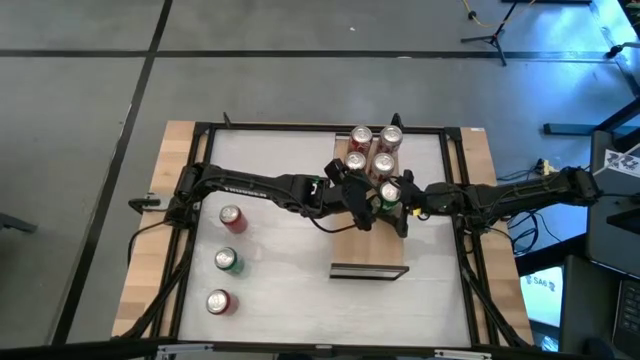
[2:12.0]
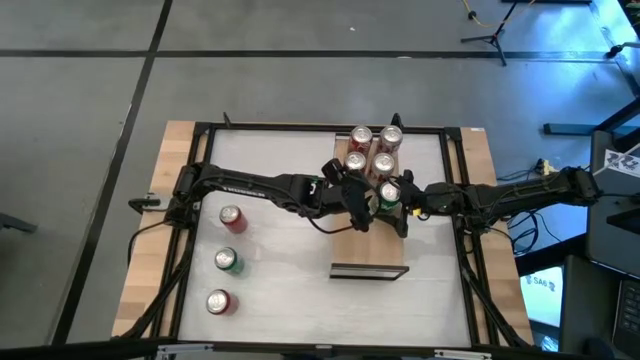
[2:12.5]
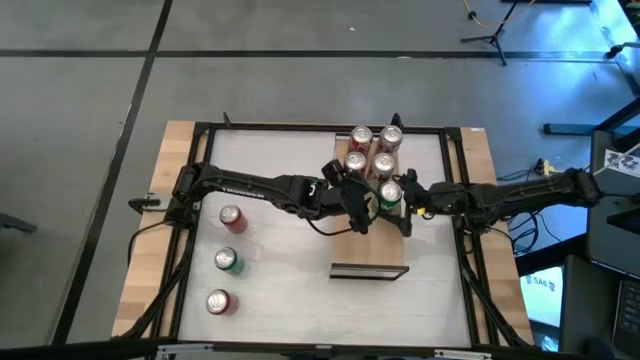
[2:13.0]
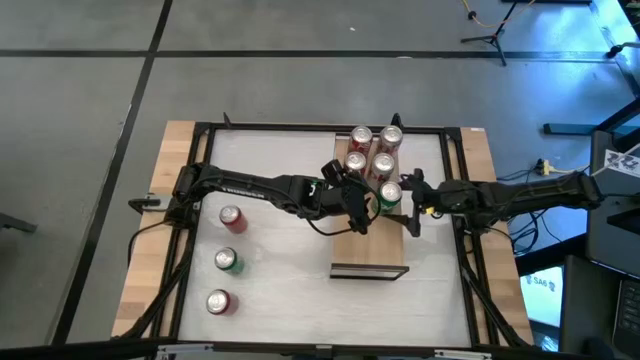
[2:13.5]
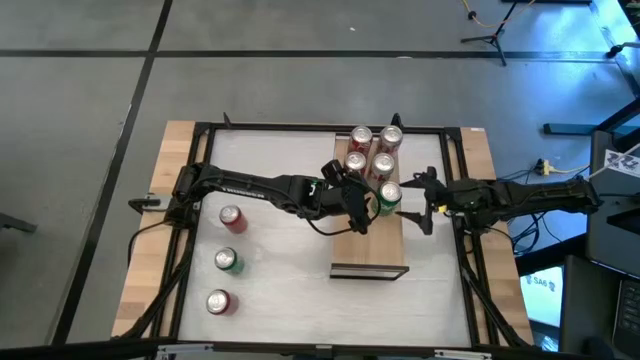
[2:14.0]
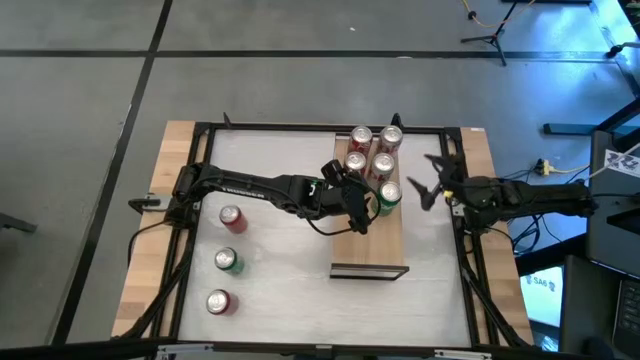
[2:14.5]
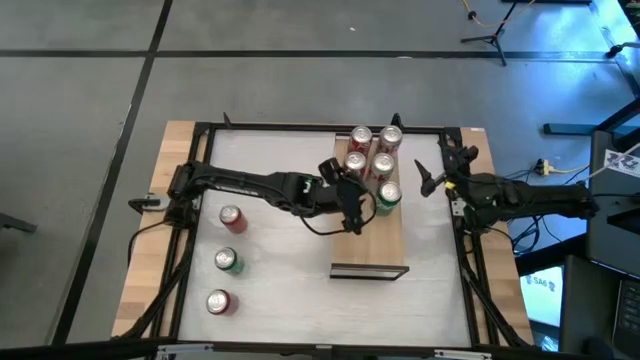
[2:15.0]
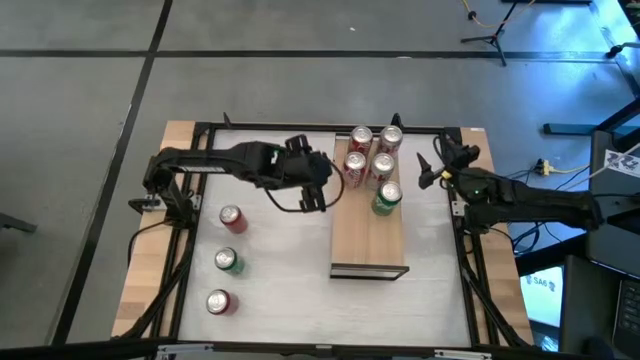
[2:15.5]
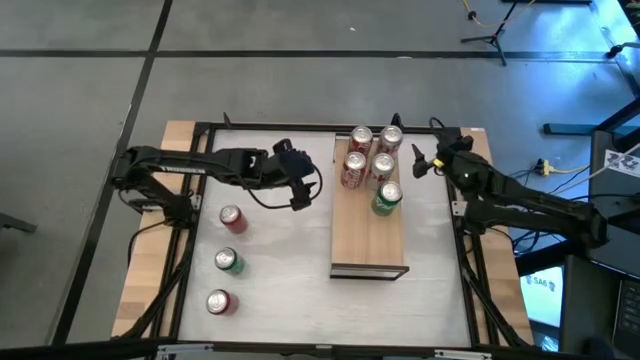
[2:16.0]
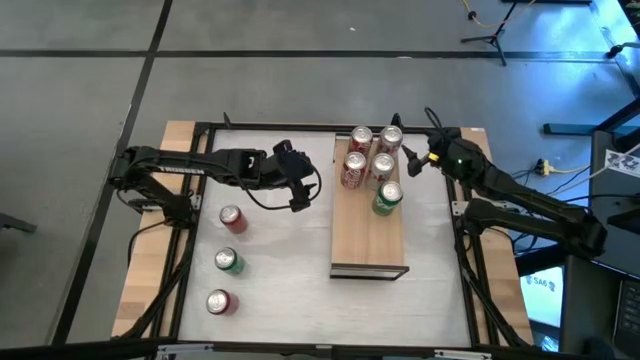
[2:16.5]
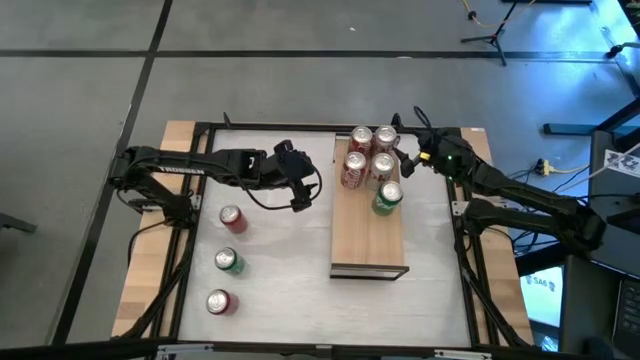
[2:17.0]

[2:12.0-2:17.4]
Task: Place canned beverage on shelf
Adjust the silver soda can on the shelf

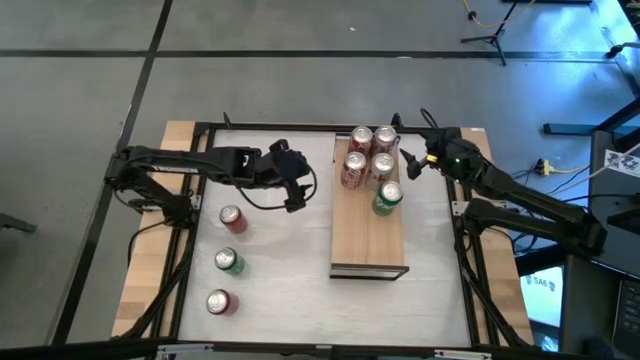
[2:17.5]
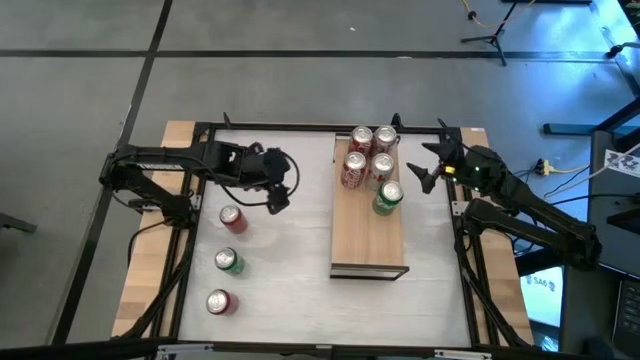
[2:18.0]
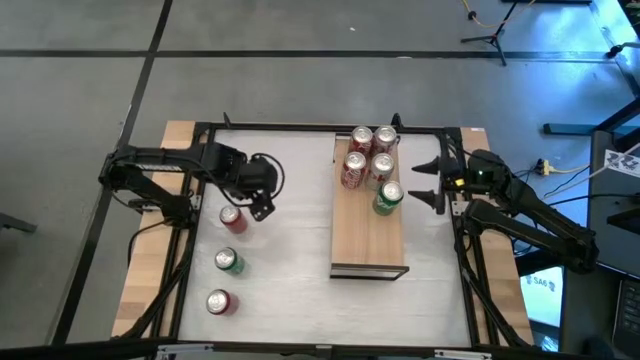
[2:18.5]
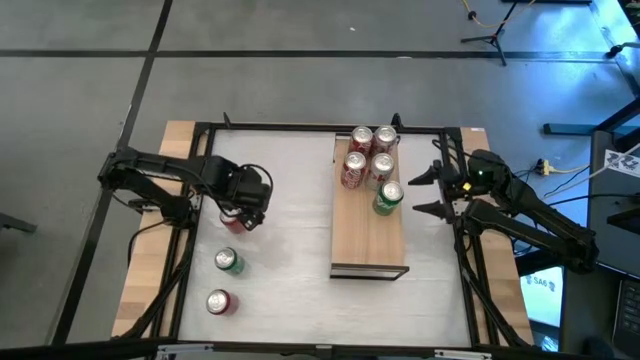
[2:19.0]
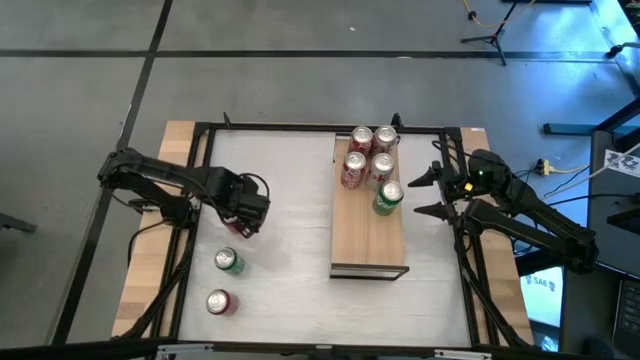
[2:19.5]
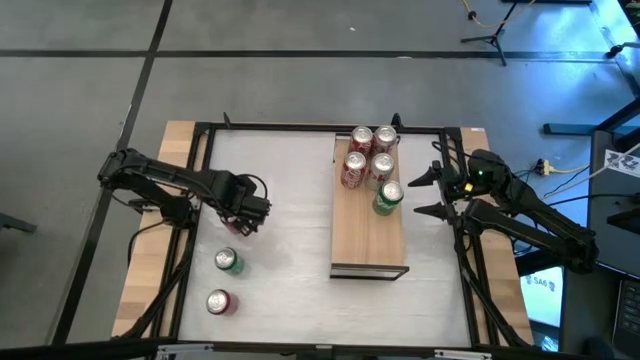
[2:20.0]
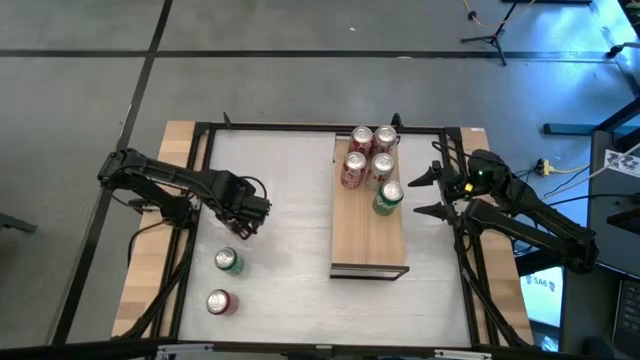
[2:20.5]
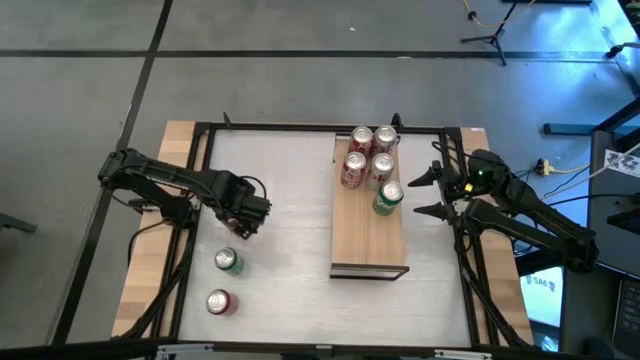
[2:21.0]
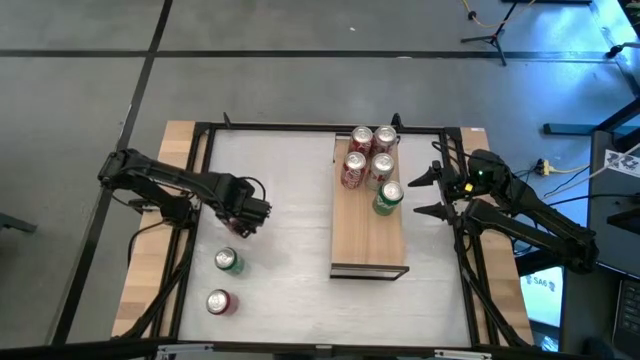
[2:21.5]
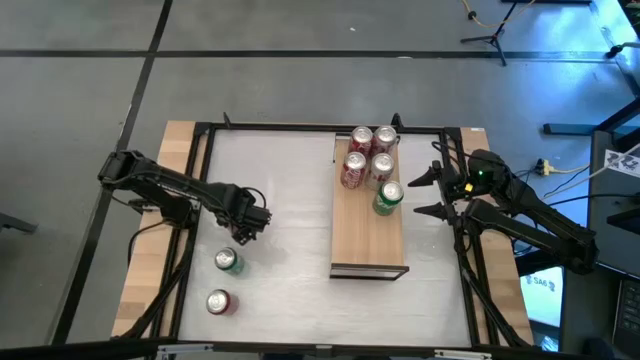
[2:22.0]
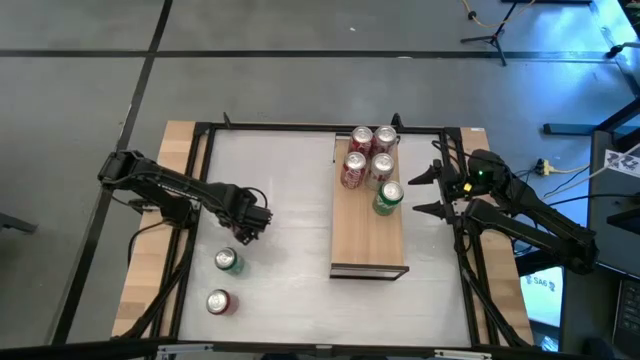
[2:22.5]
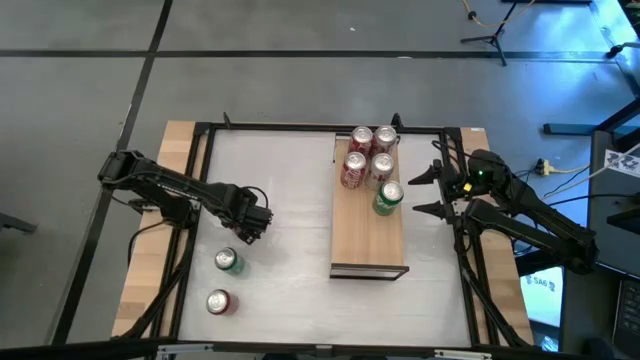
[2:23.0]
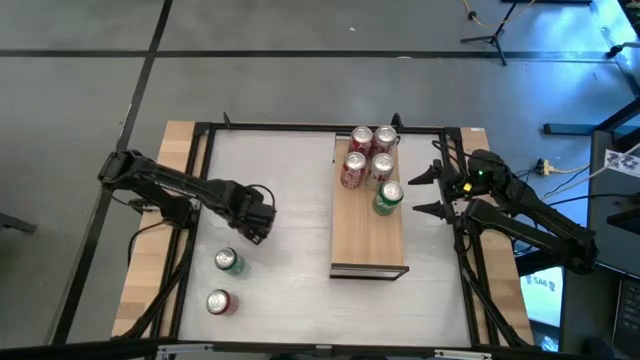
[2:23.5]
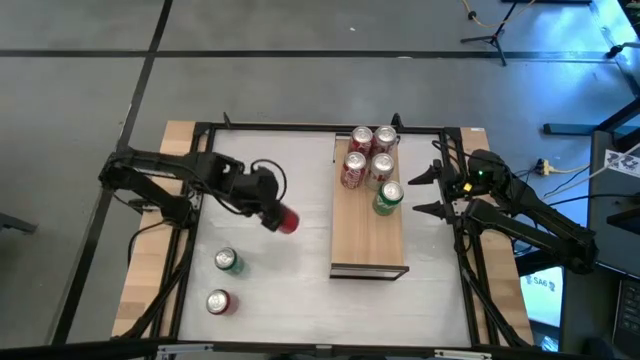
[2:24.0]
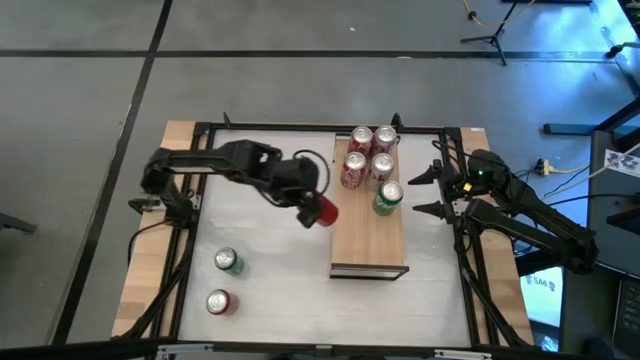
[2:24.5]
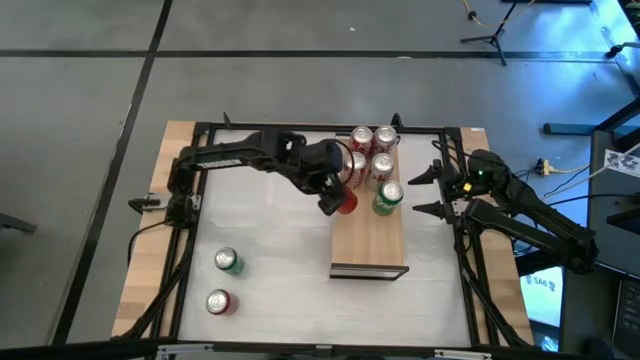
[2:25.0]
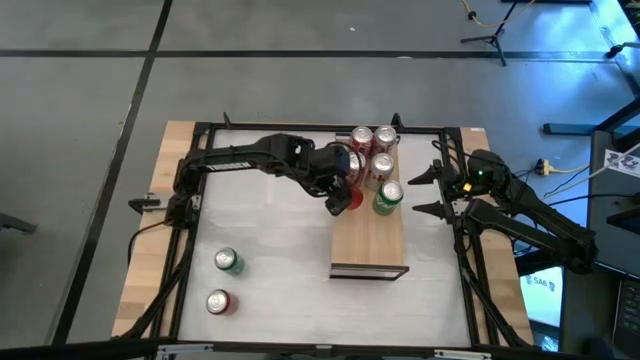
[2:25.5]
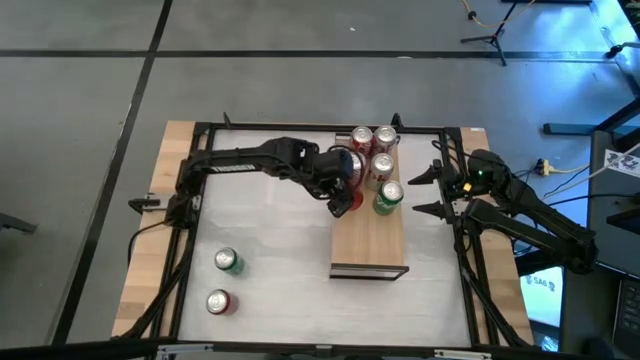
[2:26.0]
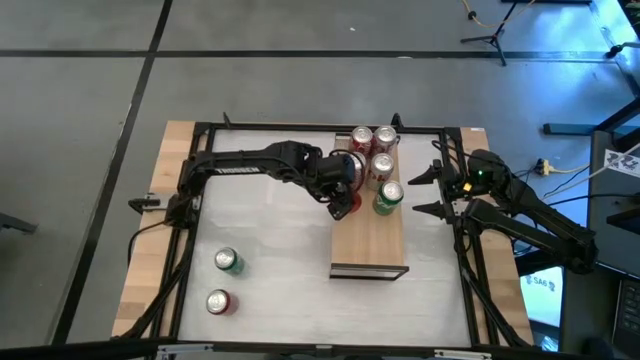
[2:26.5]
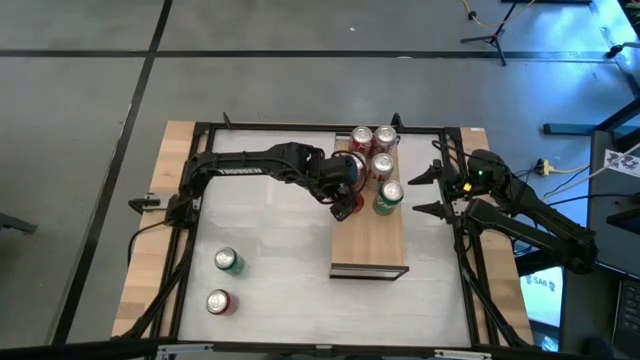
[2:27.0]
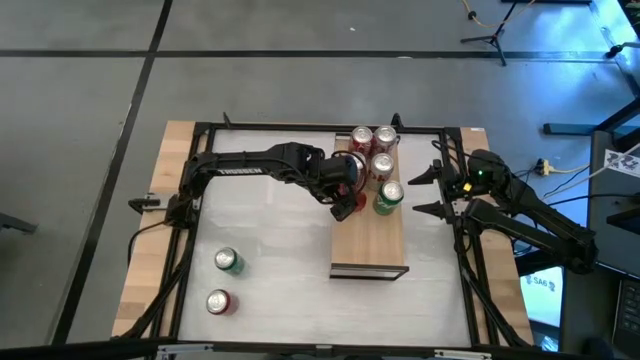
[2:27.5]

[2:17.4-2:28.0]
Put the top red black soda can on the shelf

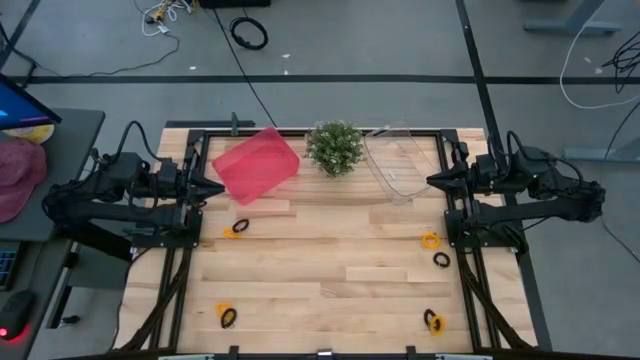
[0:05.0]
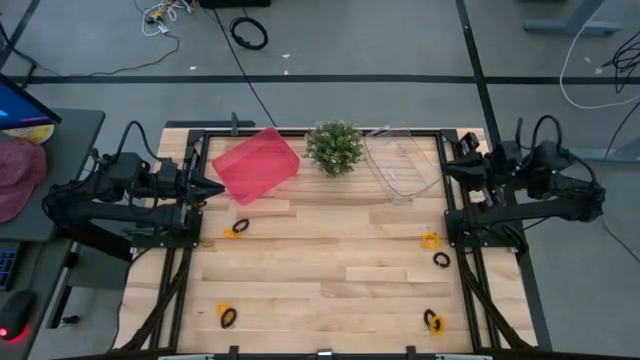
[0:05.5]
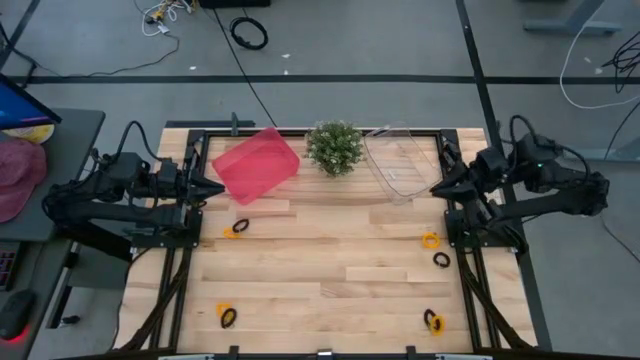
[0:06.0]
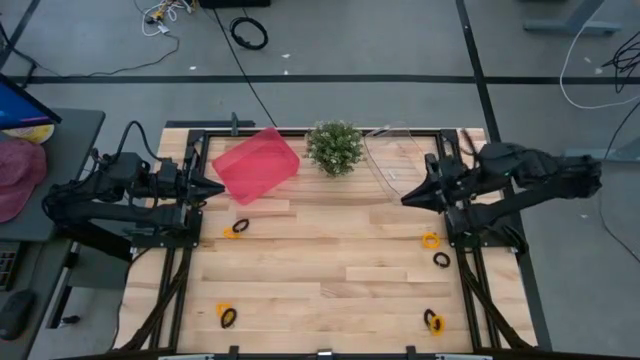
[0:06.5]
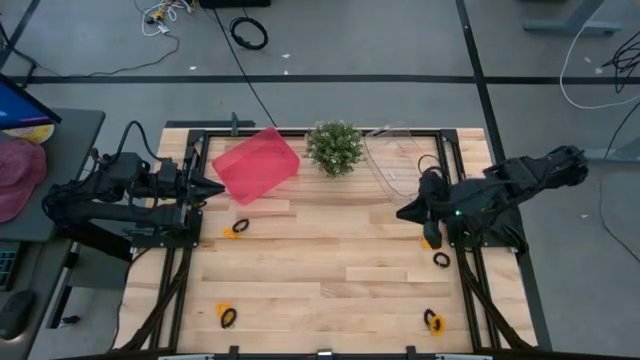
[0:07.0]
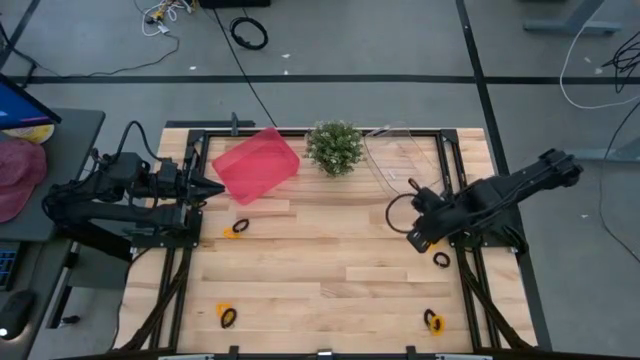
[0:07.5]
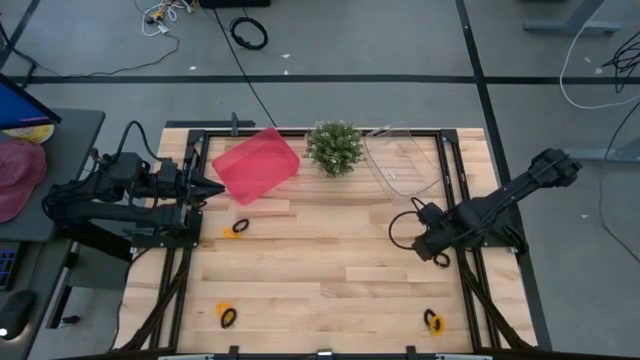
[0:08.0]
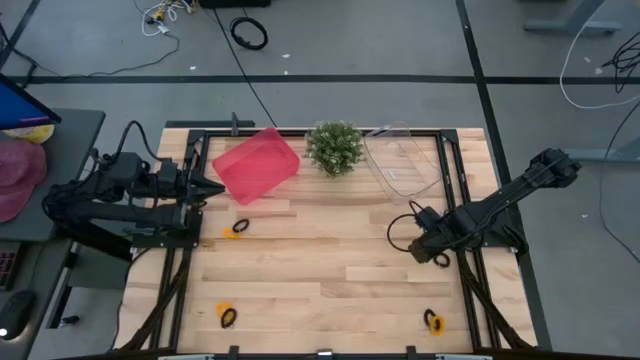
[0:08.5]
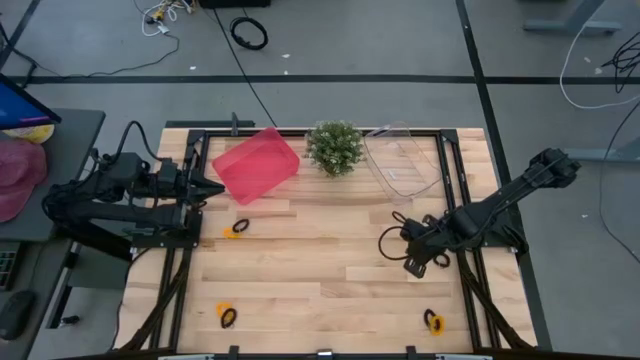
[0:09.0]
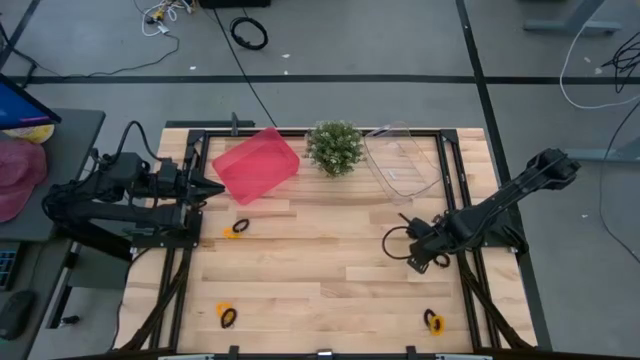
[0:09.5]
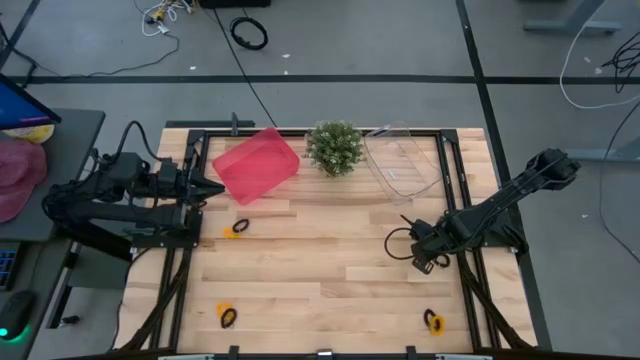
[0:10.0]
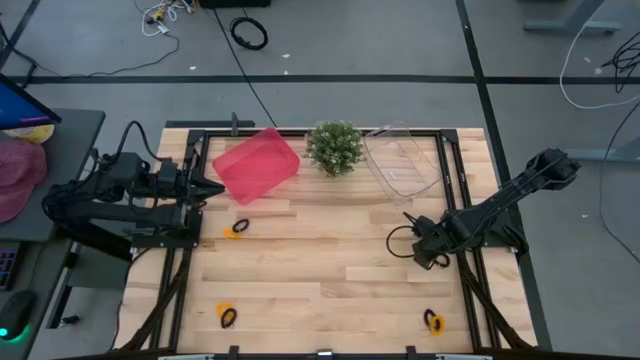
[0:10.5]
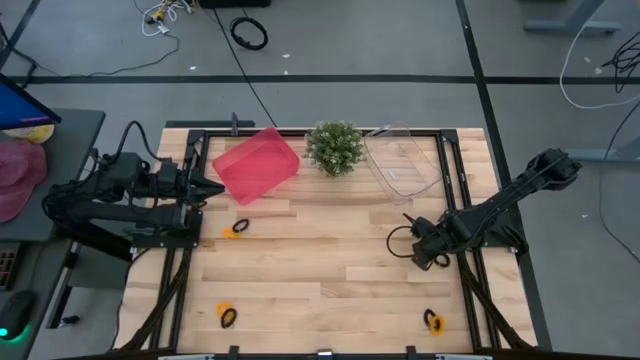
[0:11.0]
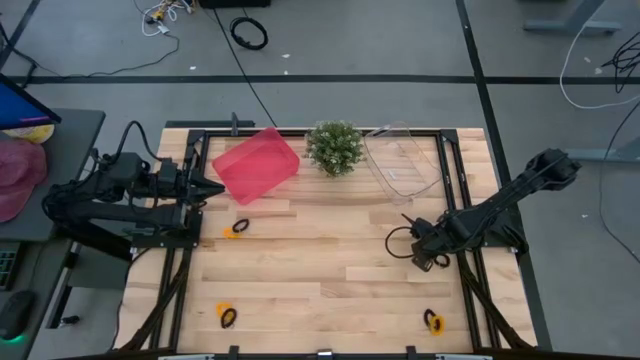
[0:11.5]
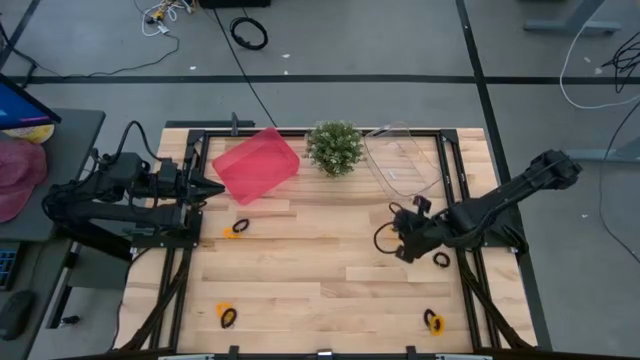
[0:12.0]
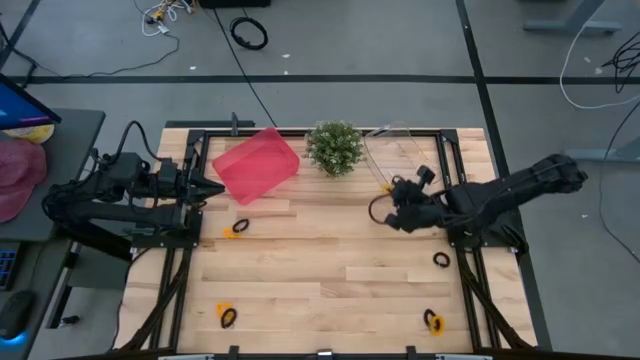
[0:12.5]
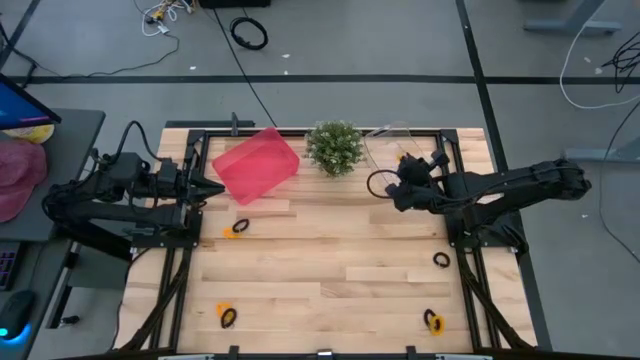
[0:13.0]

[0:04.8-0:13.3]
Task: Sort spring keychains
Put the yellow spring keychain into the transparent bin
